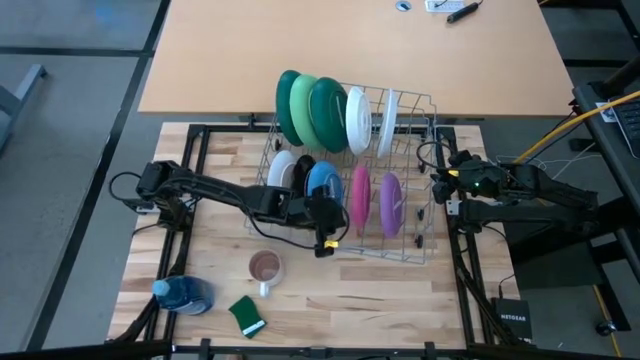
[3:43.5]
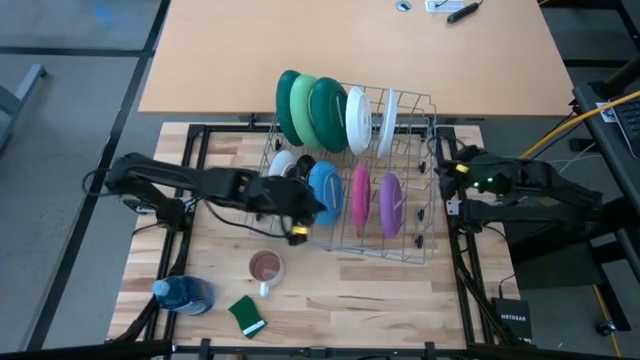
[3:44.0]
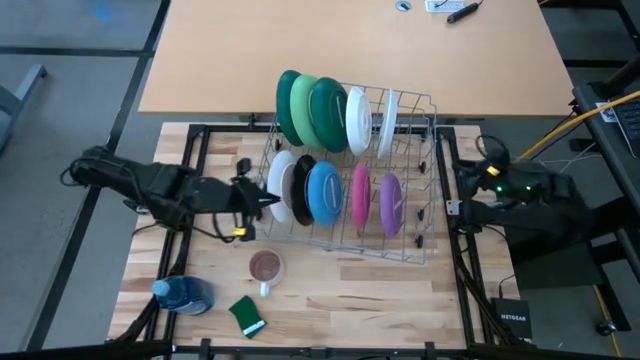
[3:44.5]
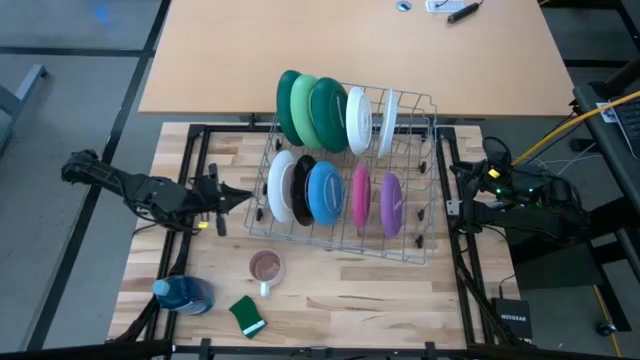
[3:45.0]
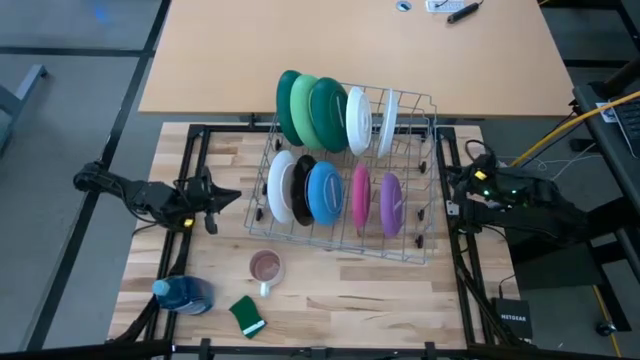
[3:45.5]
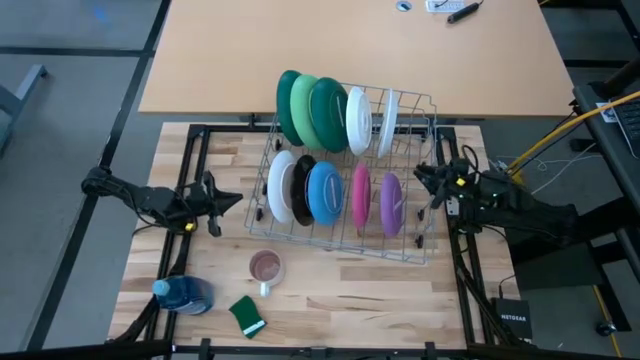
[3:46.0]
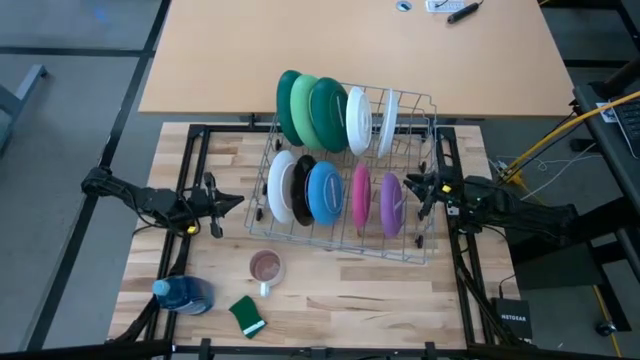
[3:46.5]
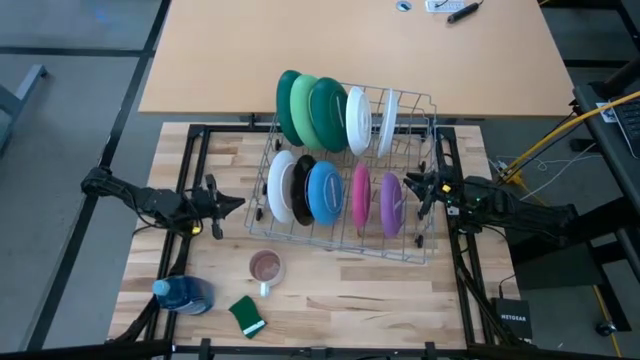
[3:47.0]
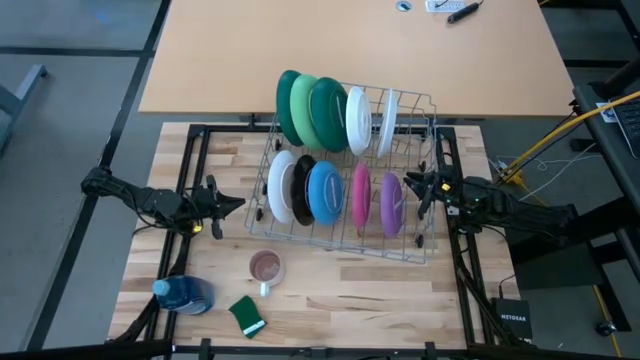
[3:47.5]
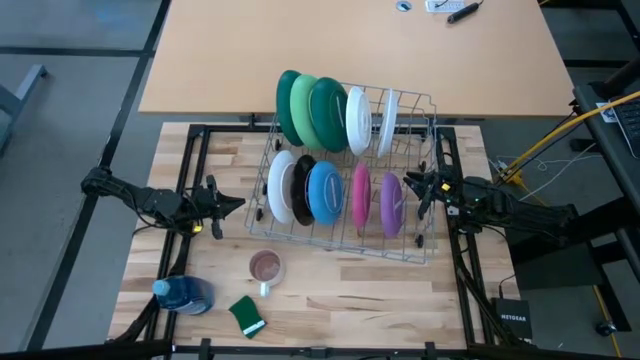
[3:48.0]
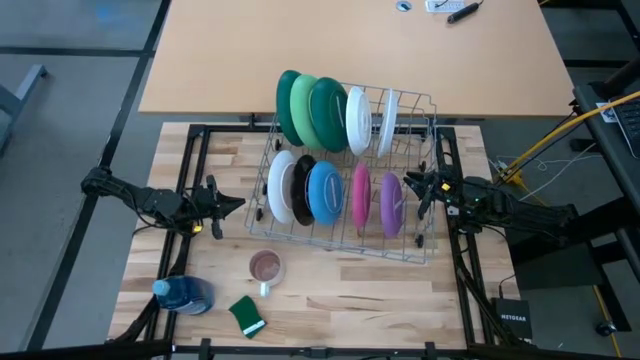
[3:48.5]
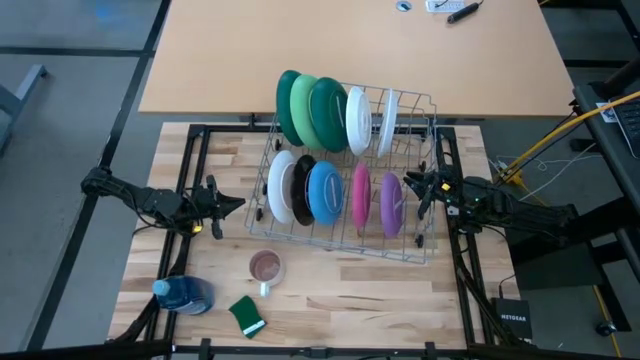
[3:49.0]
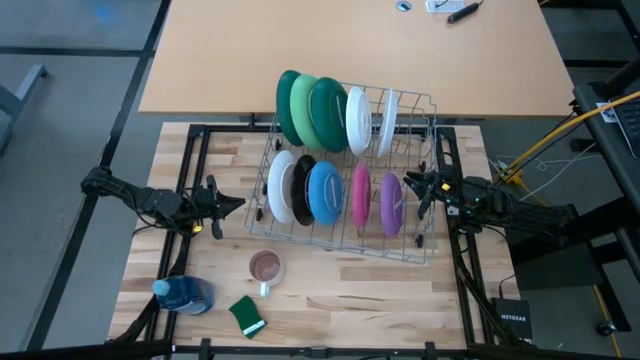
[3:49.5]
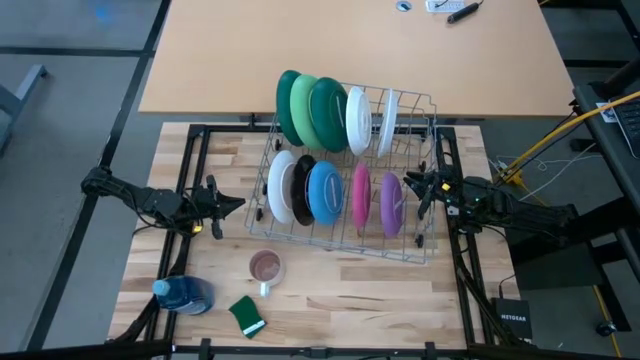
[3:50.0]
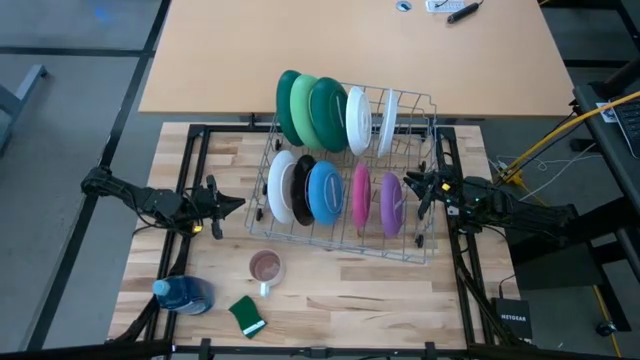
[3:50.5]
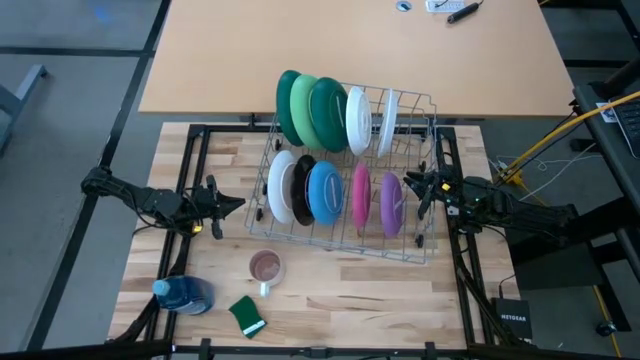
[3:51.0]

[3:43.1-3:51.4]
Task: Sort dishes
Return to Home Position

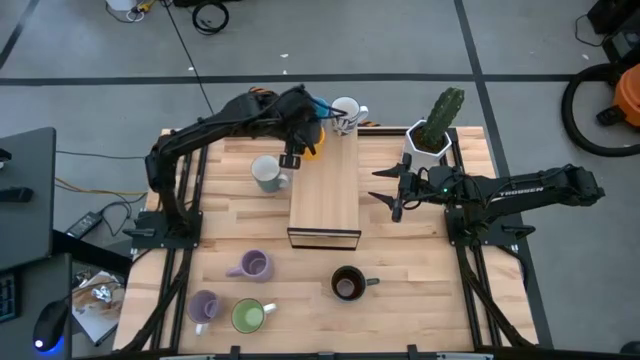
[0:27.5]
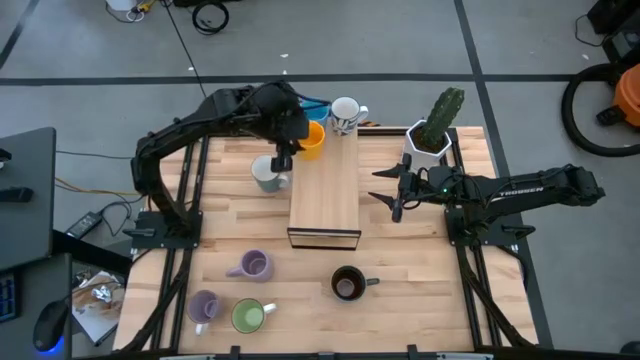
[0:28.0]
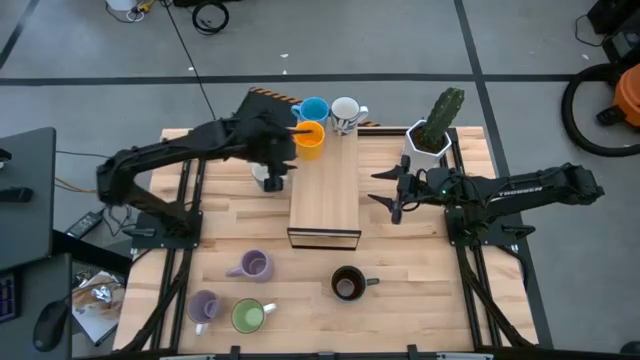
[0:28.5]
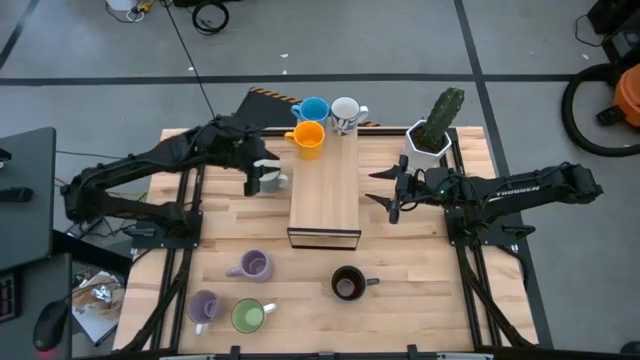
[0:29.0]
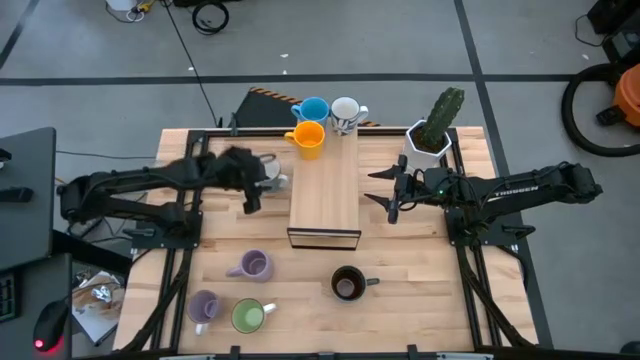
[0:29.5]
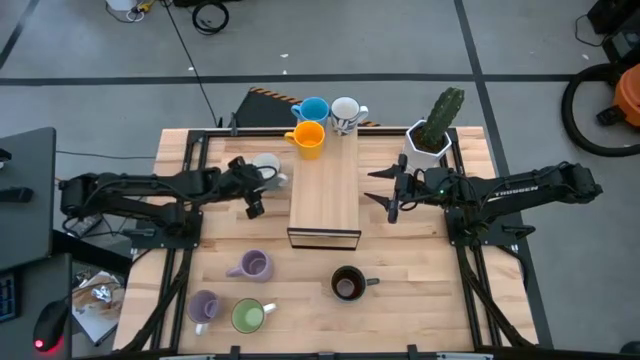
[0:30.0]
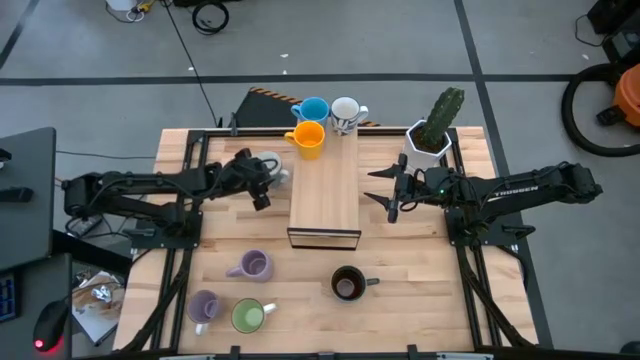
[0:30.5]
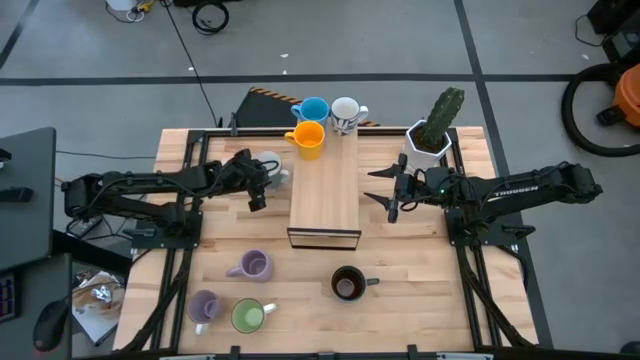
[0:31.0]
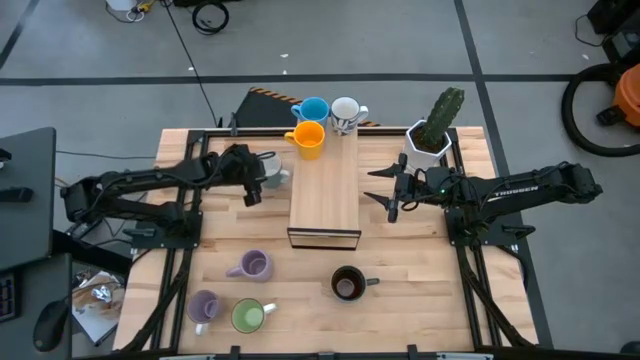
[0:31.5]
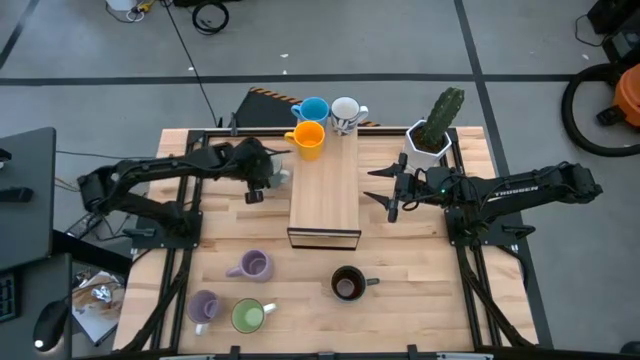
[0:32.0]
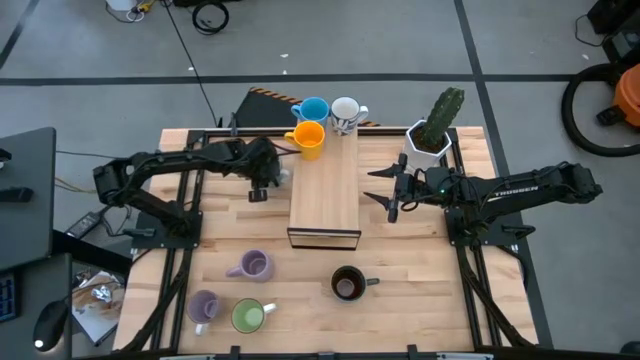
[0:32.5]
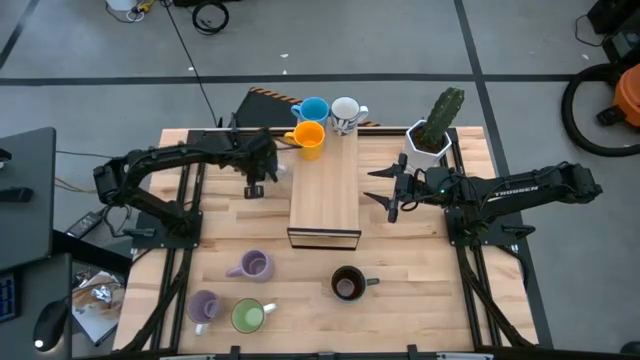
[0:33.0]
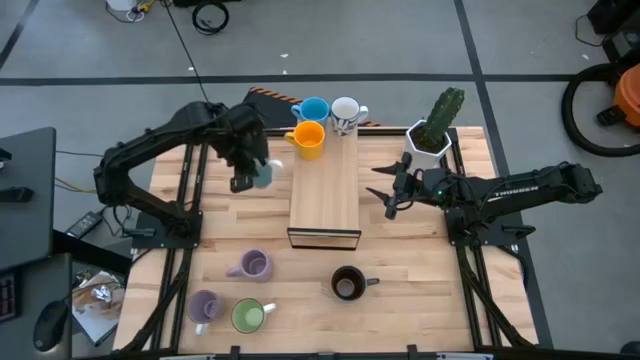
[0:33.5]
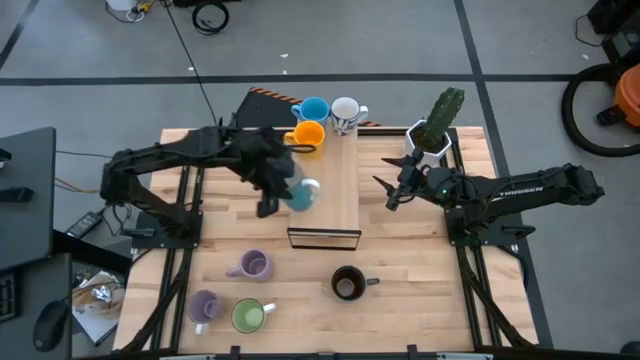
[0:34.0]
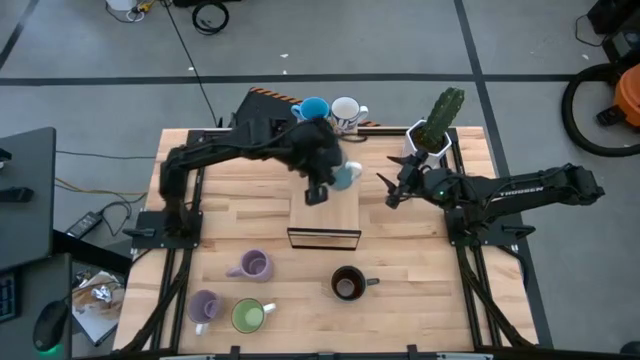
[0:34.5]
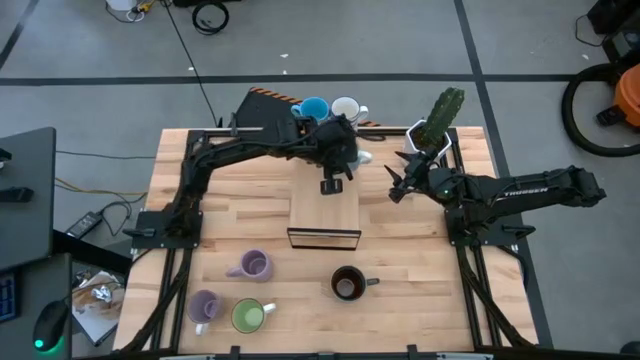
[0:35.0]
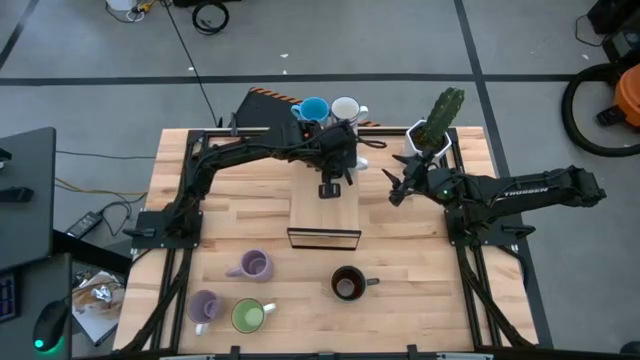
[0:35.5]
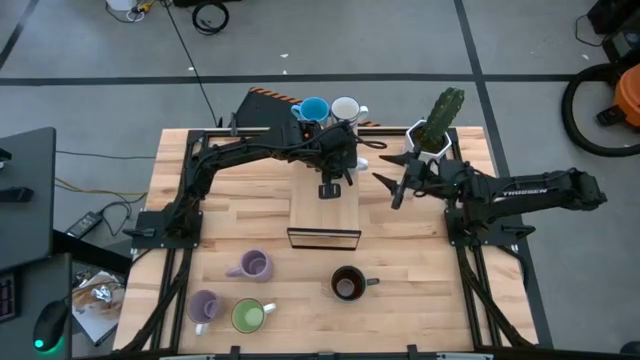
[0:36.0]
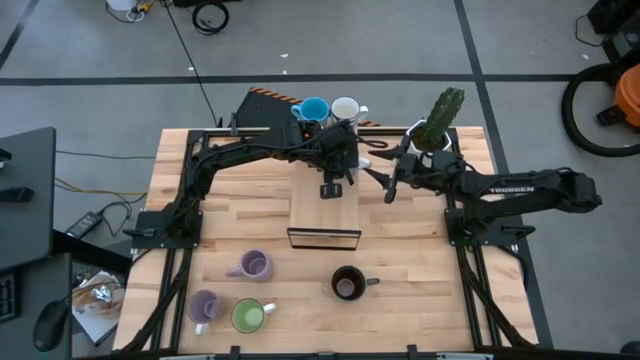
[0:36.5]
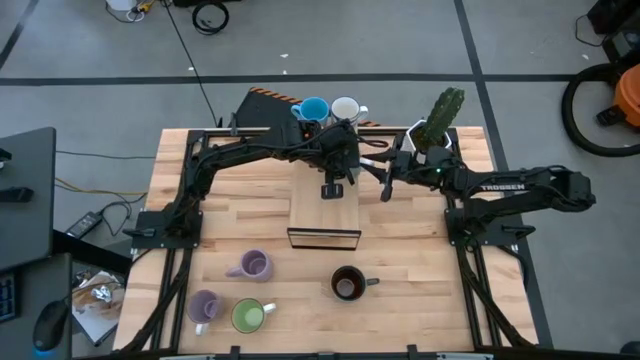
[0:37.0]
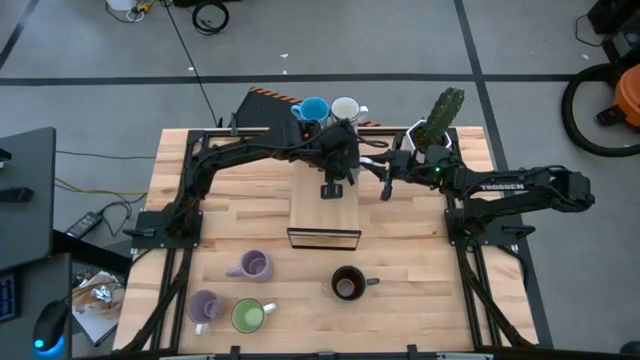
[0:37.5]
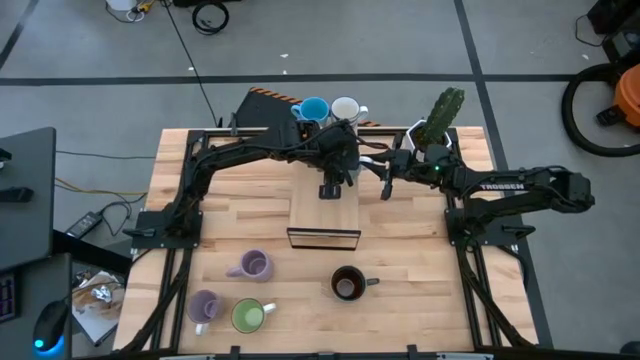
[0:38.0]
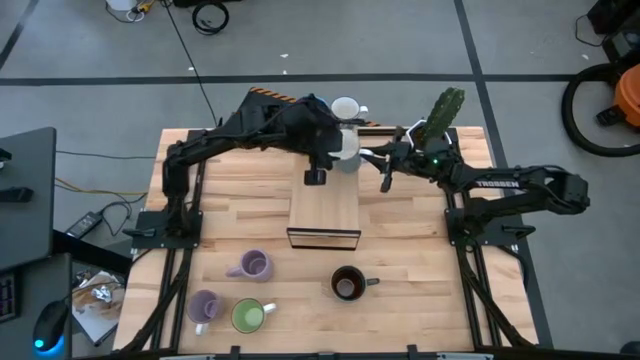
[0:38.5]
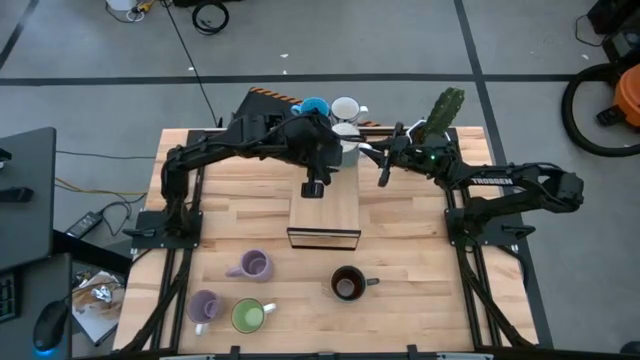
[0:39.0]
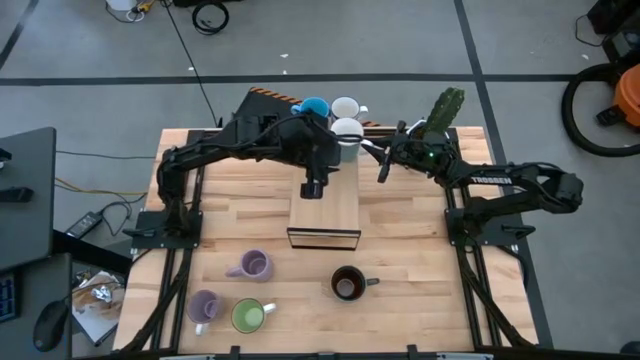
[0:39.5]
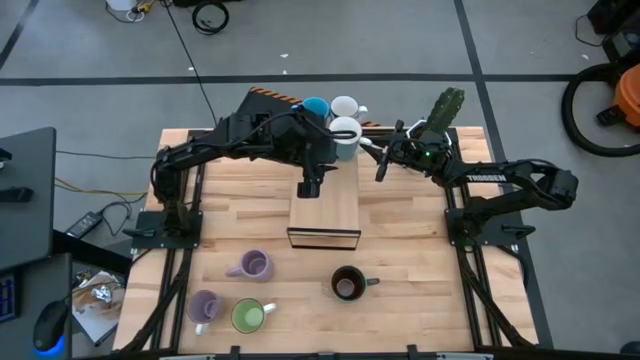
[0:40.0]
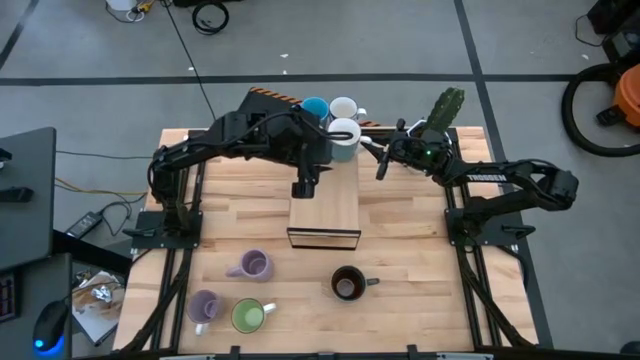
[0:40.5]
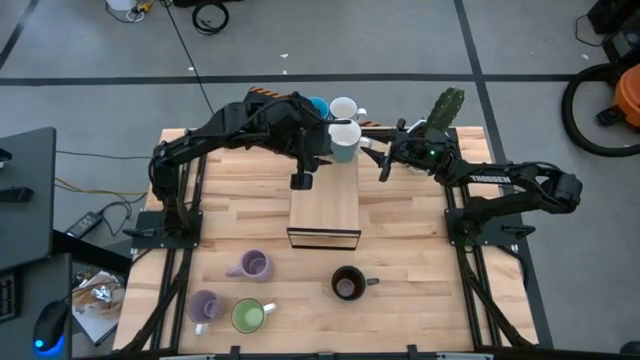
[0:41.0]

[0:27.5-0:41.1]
Task: Place coffee mugs
Put the light blue mug on the shelf
